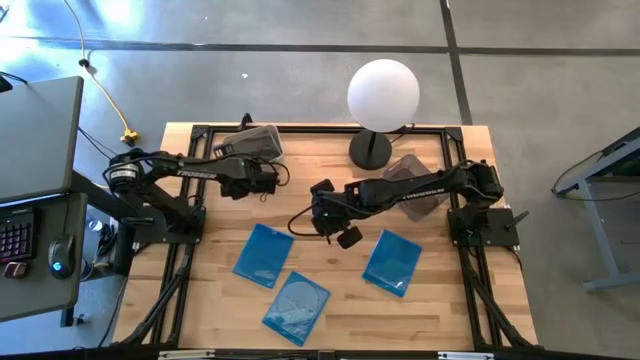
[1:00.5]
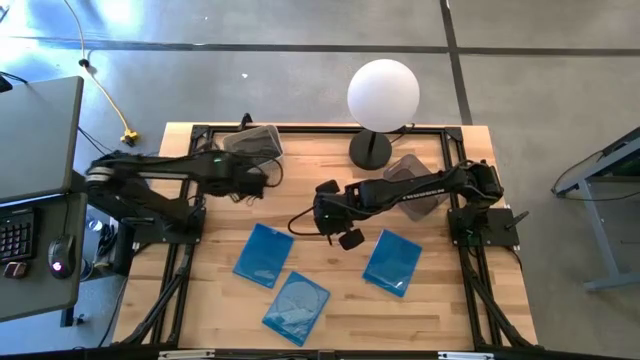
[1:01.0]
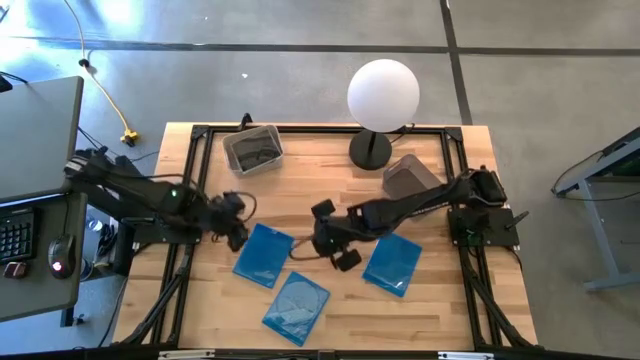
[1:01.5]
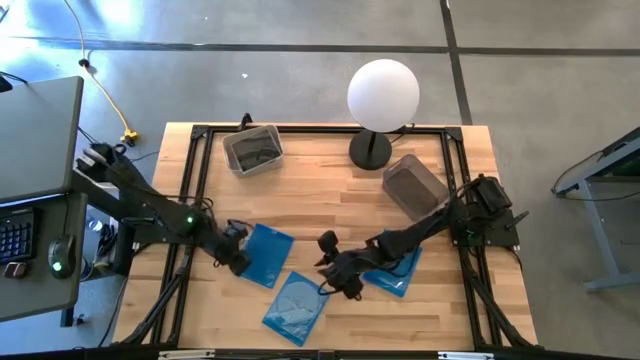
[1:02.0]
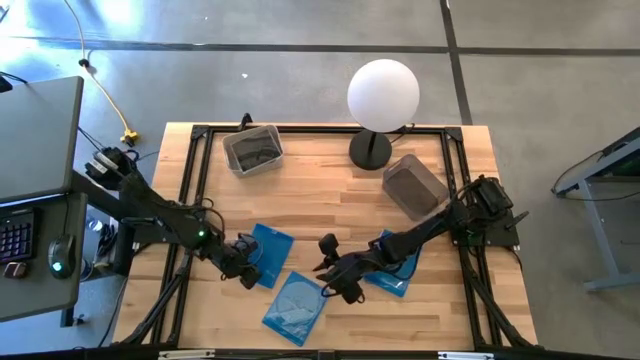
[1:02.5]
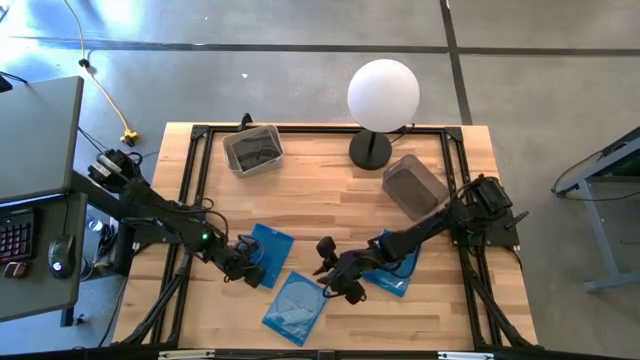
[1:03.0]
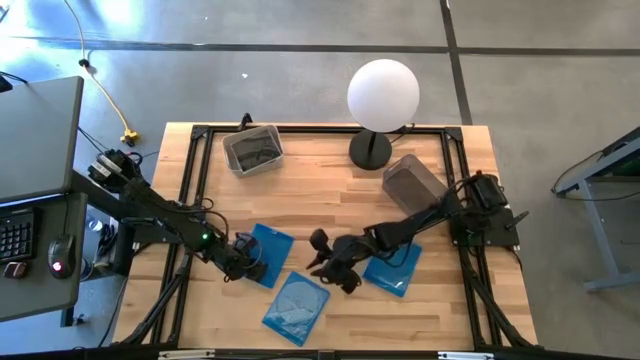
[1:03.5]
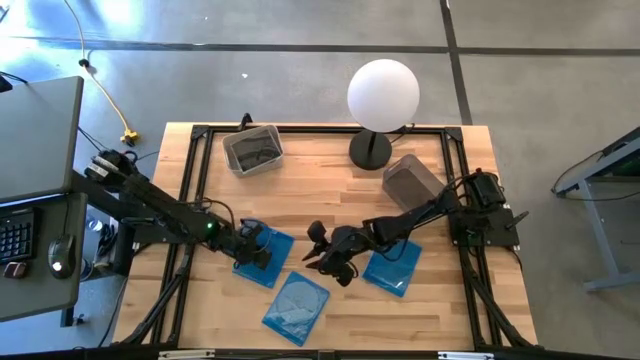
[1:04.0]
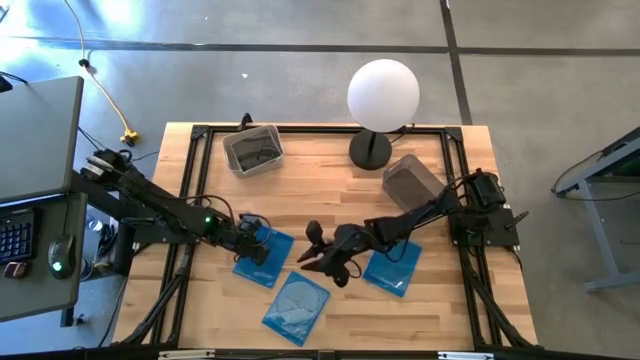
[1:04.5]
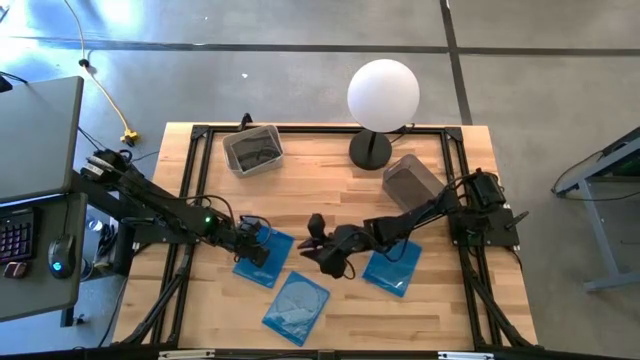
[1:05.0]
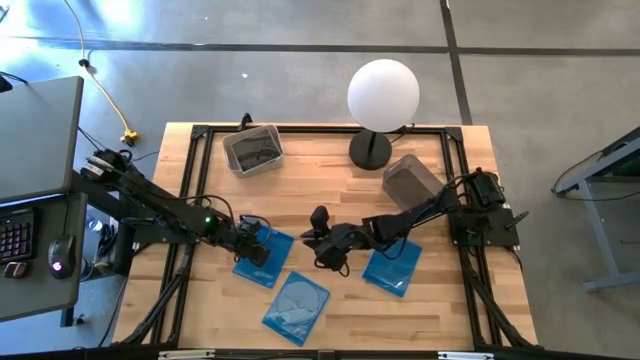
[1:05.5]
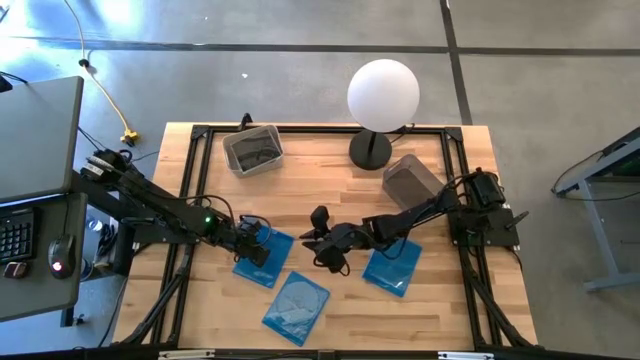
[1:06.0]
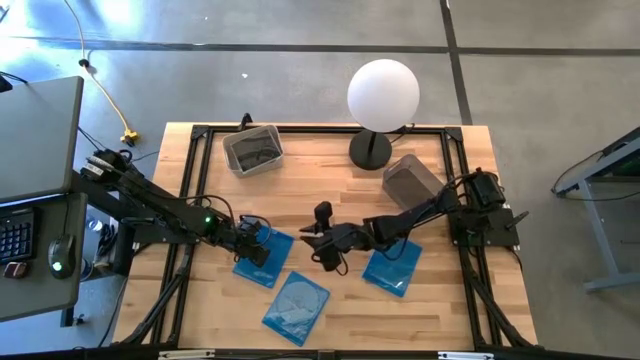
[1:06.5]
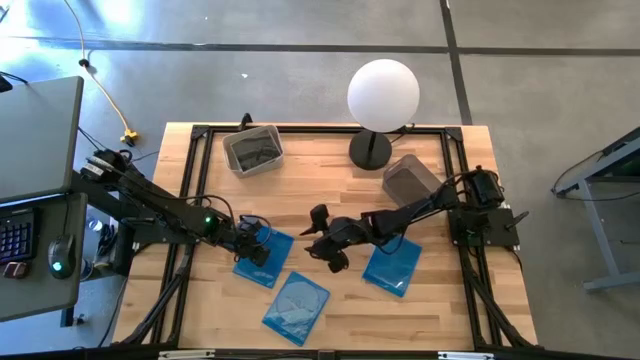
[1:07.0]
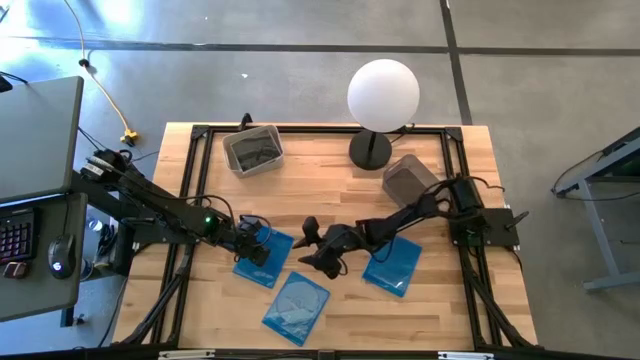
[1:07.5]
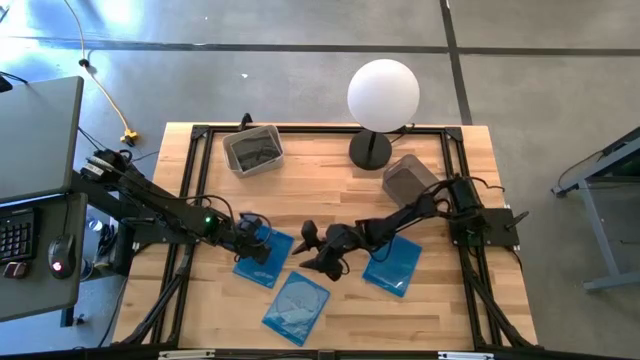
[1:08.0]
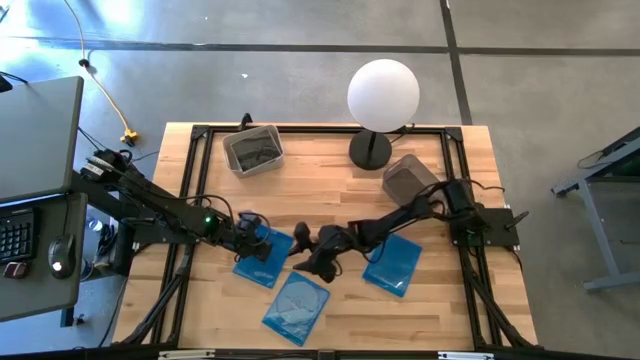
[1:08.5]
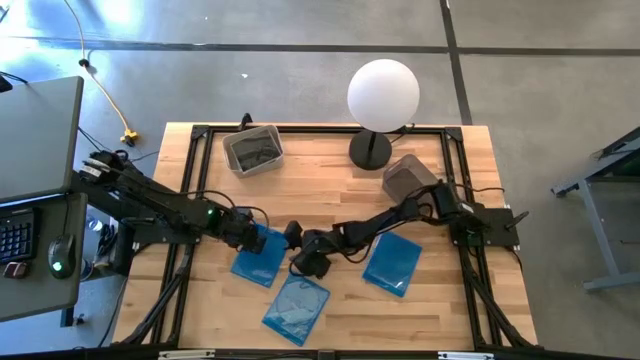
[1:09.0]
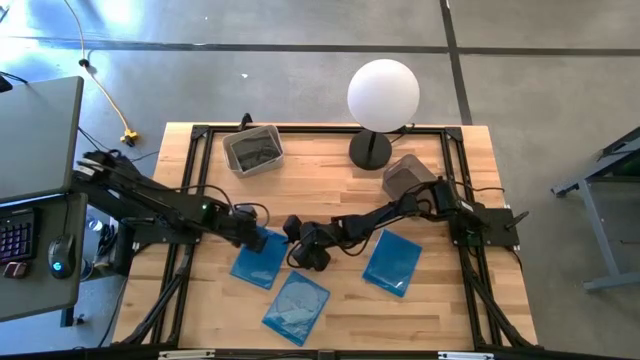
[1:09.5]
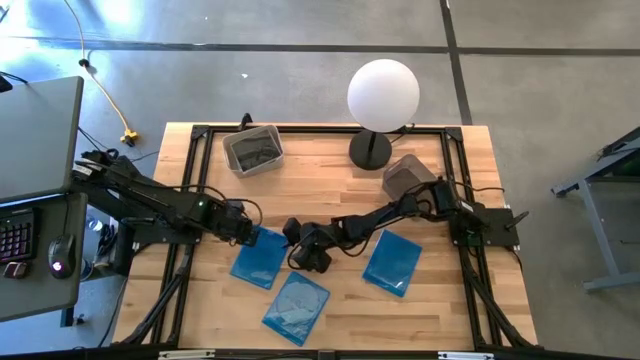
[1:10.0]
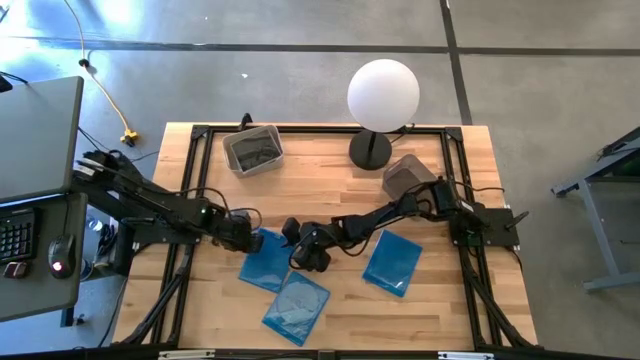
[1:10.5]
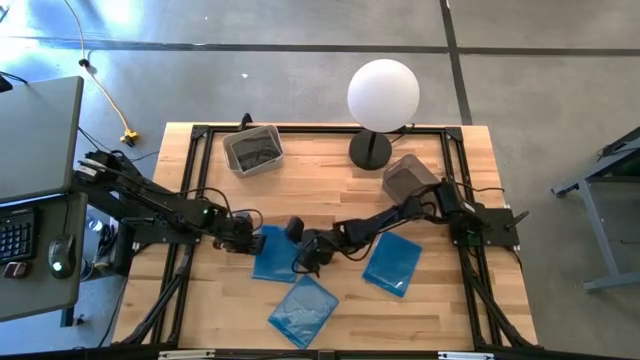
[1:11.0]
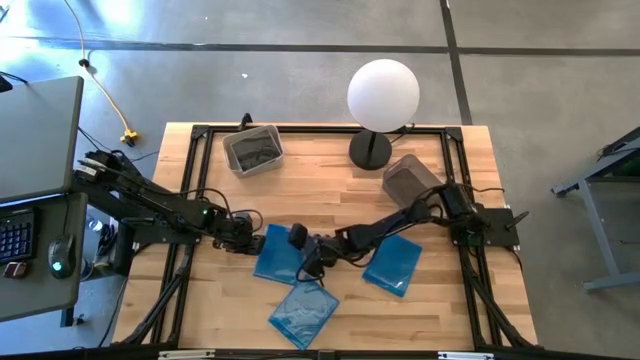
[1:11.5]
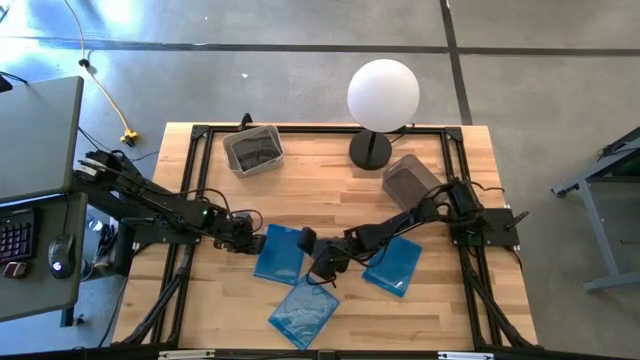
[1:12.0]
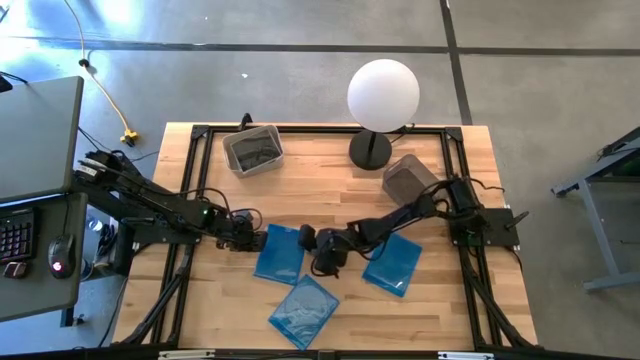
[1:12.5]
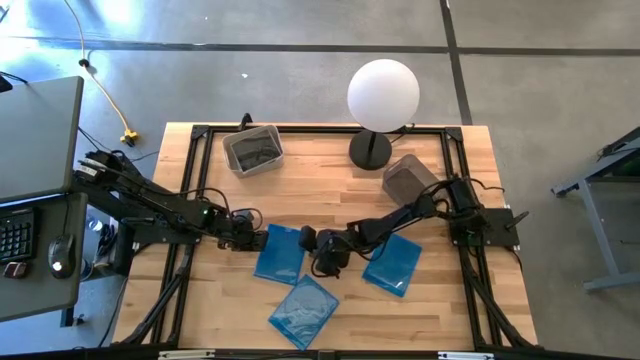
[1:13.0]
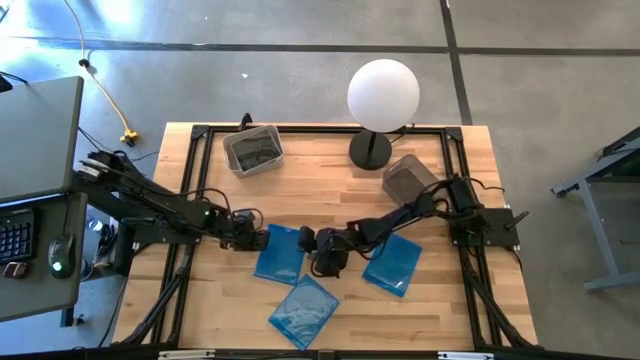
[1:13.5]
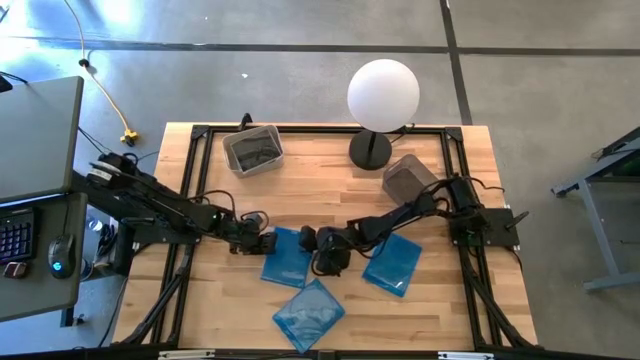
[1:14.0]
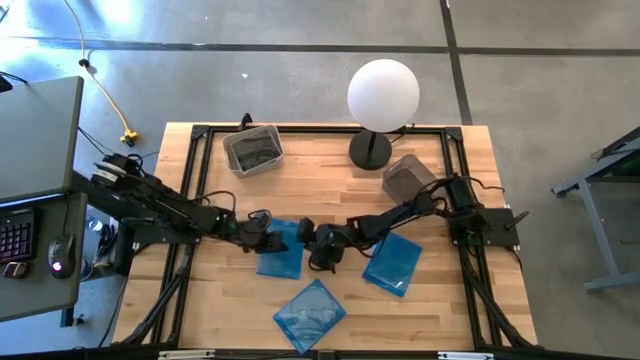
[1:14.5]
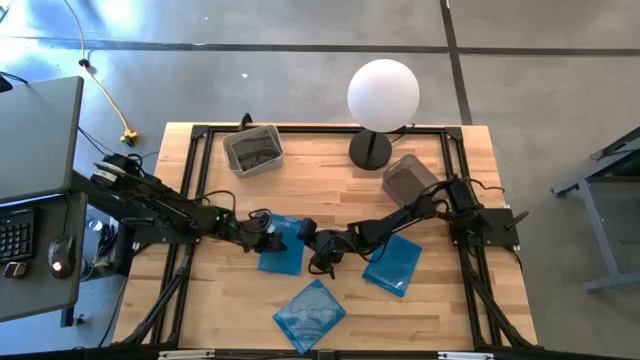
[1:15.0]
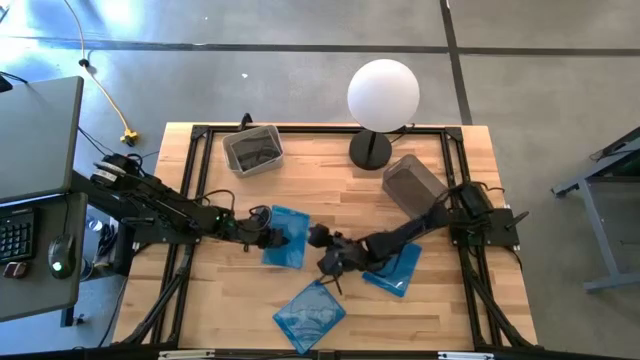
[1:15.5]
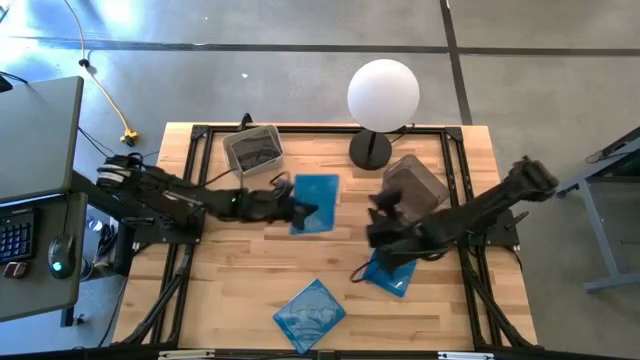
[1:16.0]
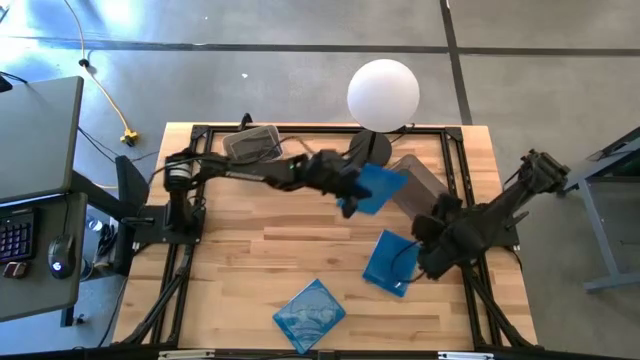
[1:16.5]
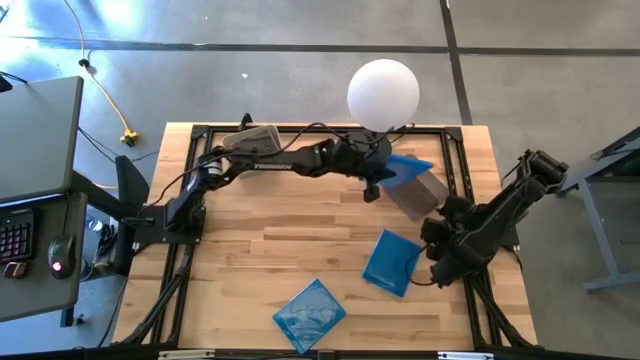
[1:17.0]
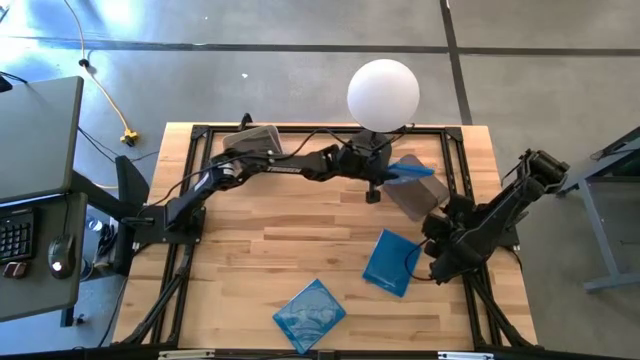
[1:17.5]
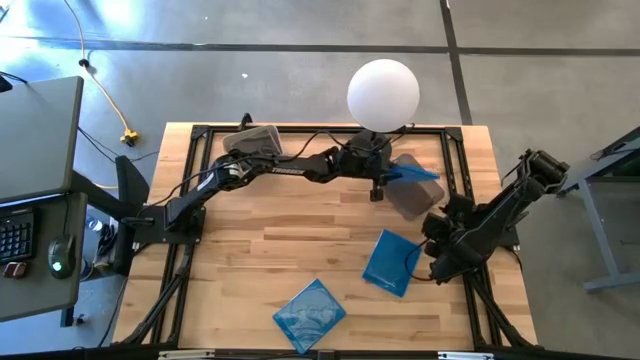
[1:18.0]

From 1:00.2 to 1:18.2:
Task: Pick & place jewel cases by type
Put the left blue CD case into the gray bin

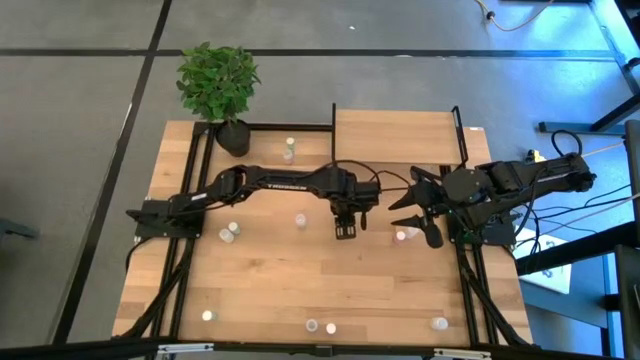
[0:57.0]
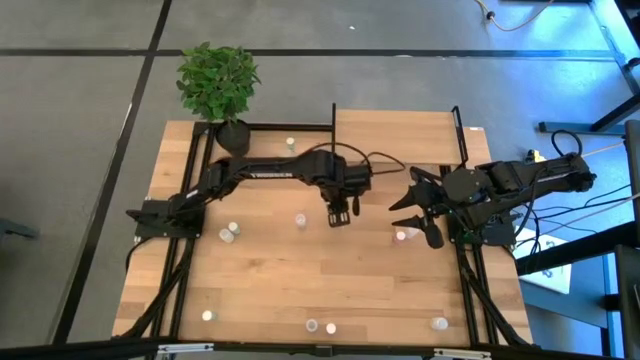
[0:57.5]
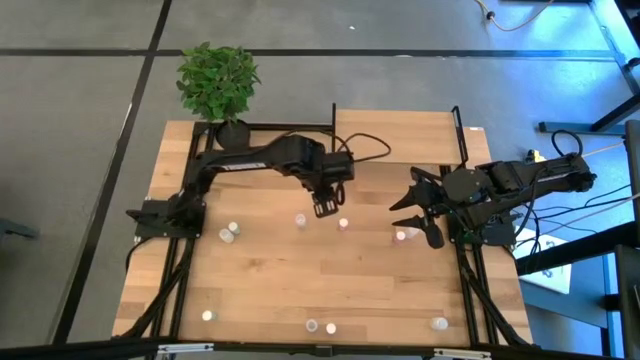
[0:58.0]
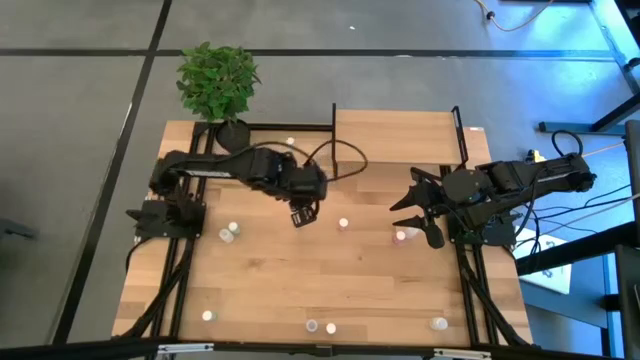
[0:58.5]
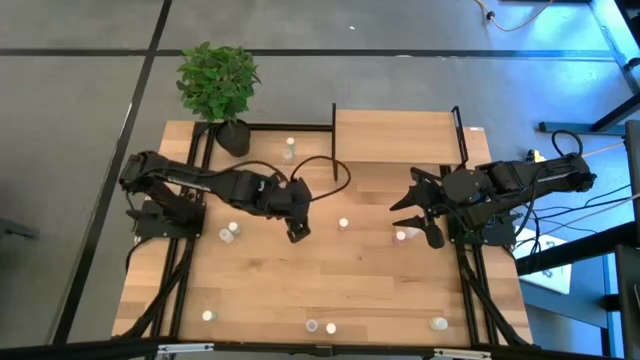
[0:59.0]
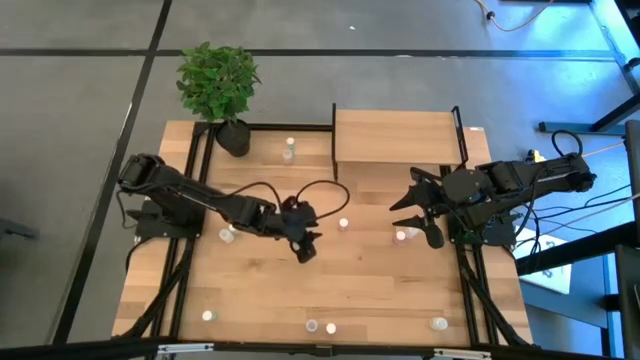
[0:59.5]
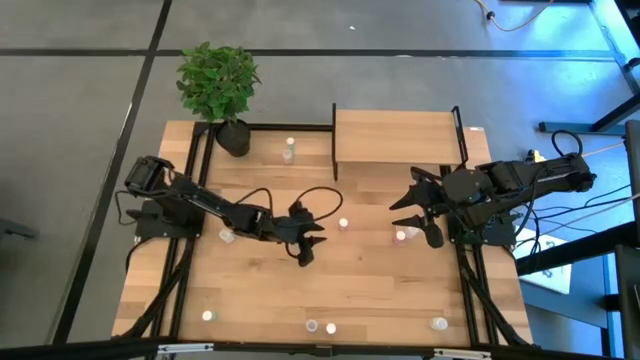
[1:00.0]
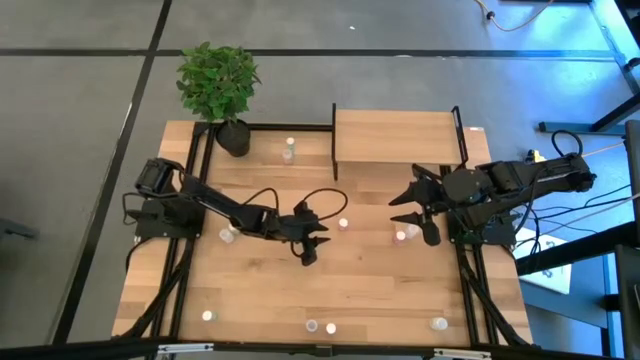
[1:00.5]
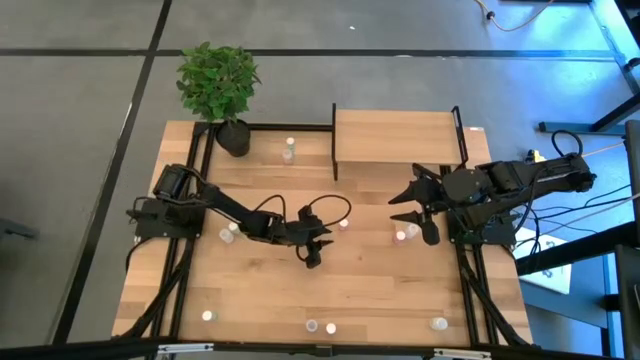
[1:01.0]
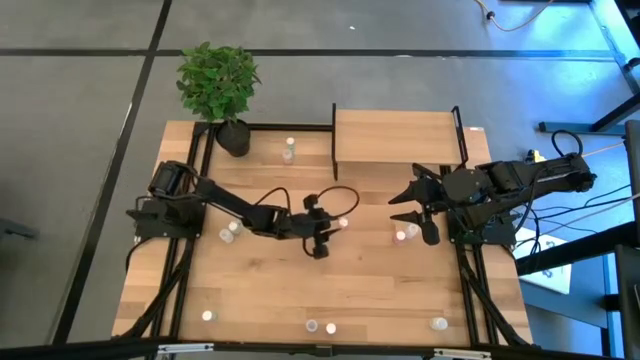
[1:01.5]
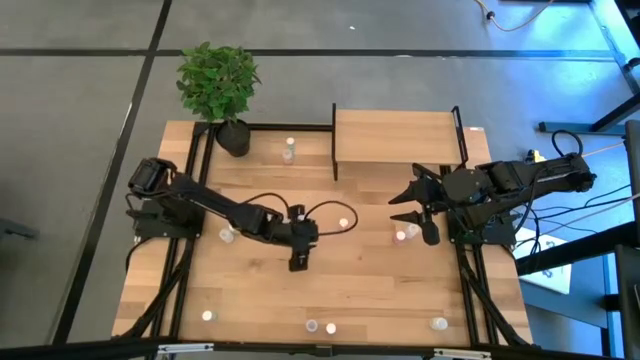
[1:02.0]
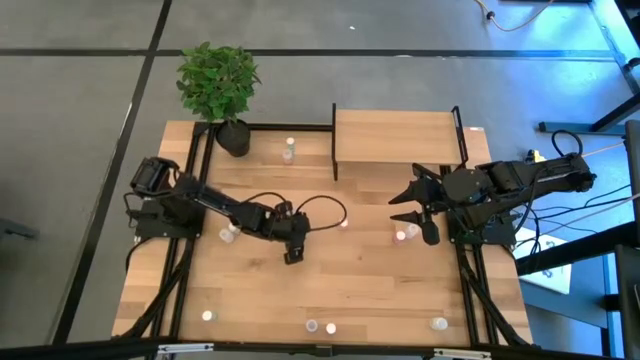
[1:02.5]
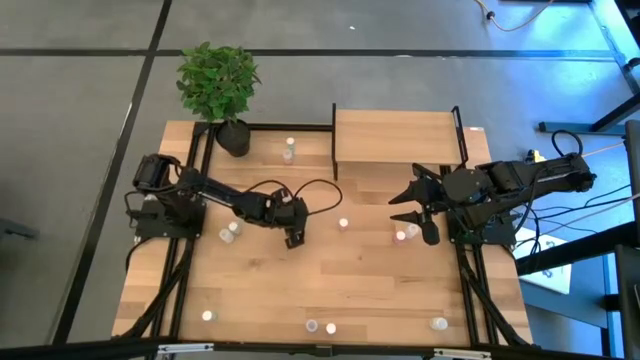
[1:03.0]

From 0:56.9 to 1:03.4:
Task: Pick and place medicine bottles onto shelf by color
Adjust the middle transparent pill bottle
